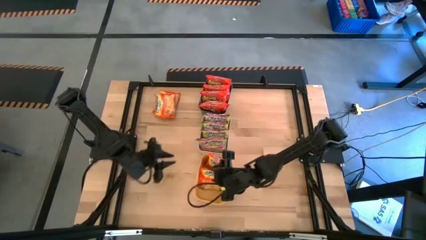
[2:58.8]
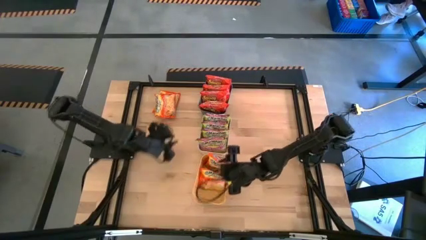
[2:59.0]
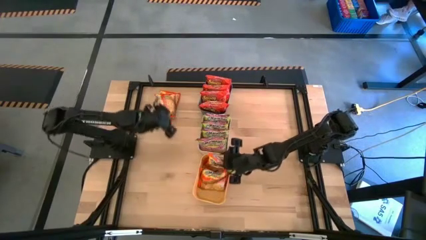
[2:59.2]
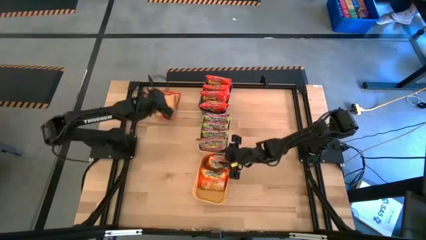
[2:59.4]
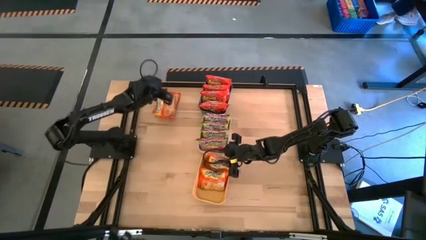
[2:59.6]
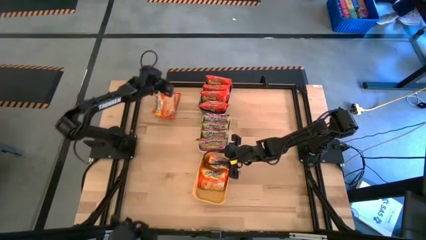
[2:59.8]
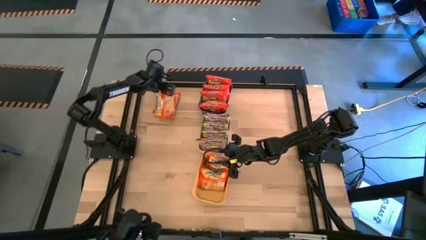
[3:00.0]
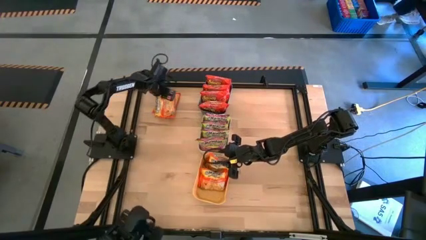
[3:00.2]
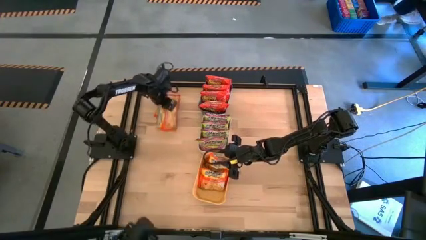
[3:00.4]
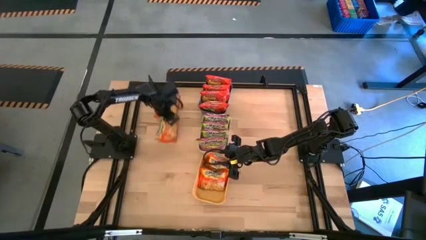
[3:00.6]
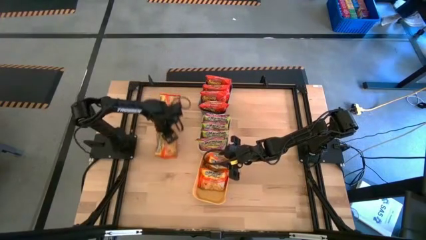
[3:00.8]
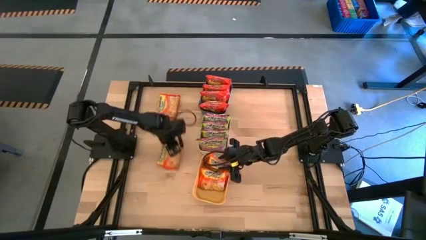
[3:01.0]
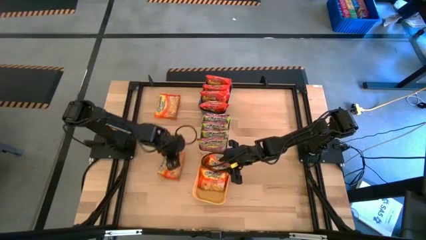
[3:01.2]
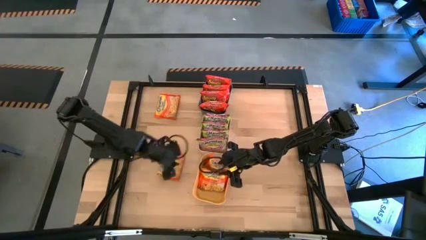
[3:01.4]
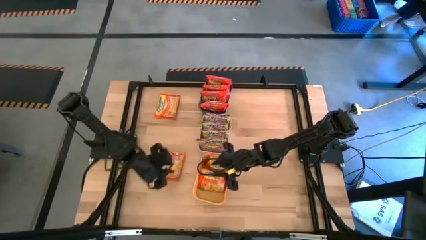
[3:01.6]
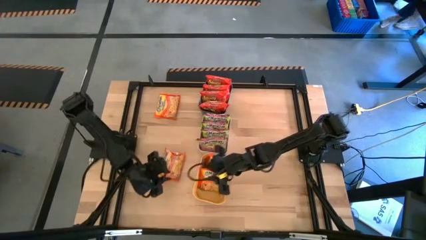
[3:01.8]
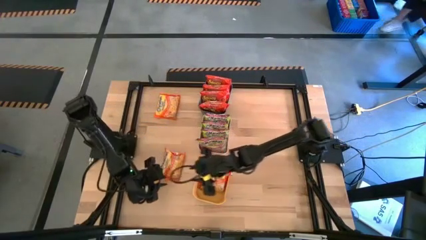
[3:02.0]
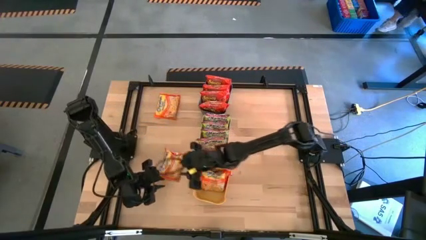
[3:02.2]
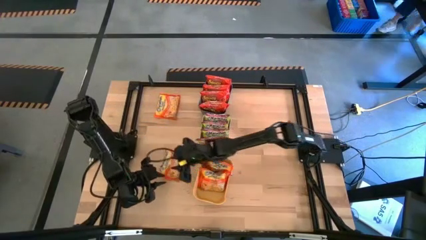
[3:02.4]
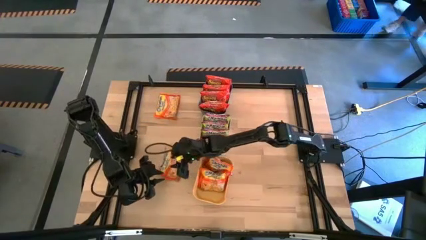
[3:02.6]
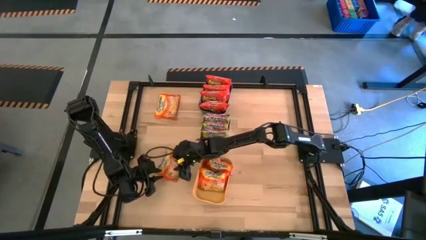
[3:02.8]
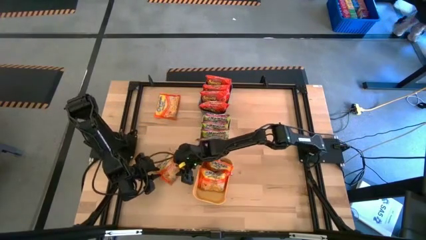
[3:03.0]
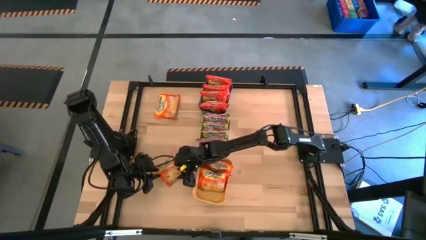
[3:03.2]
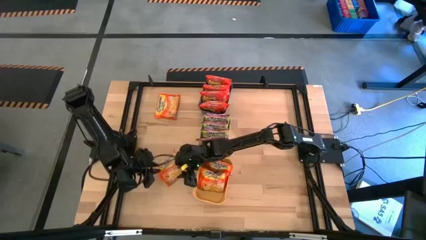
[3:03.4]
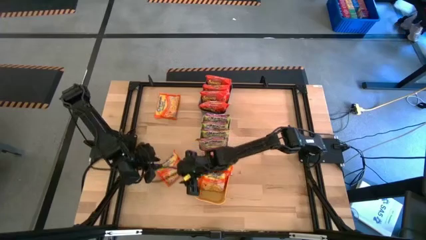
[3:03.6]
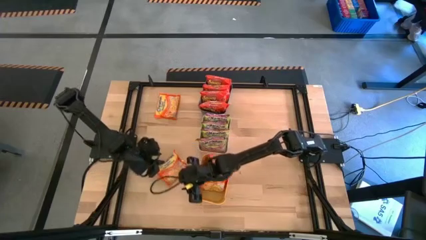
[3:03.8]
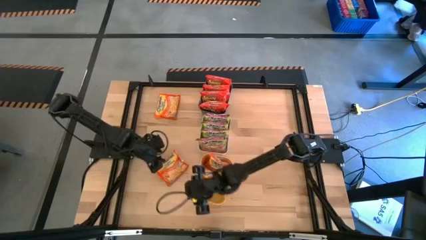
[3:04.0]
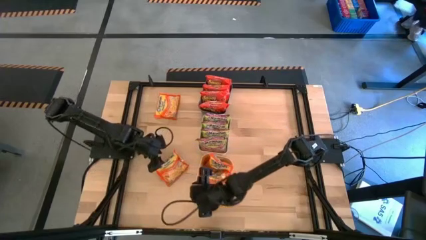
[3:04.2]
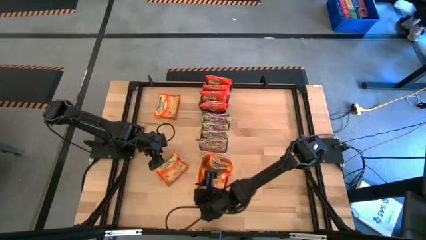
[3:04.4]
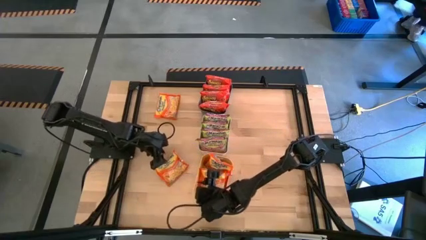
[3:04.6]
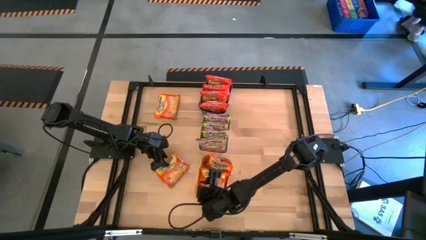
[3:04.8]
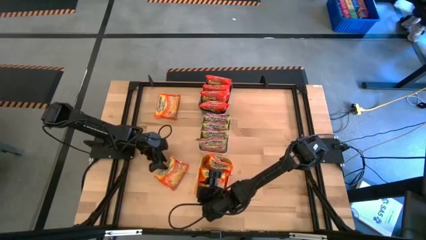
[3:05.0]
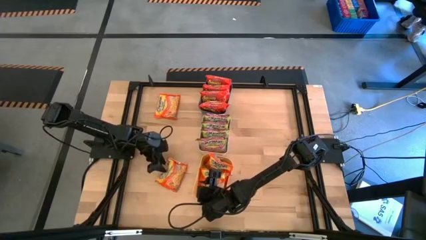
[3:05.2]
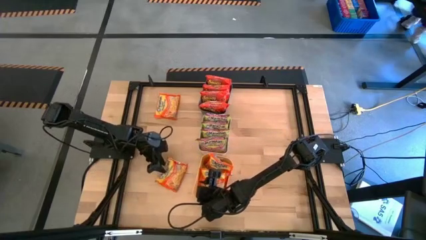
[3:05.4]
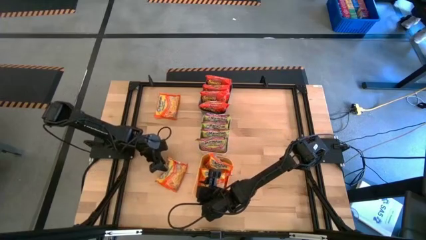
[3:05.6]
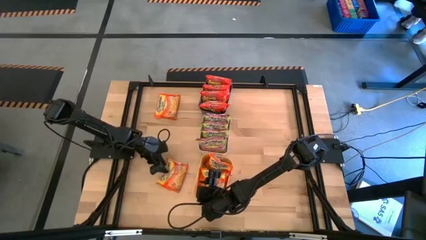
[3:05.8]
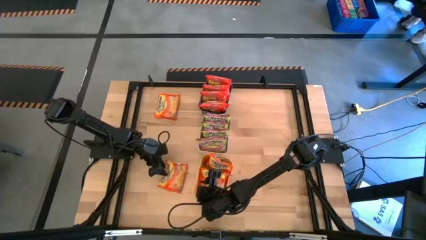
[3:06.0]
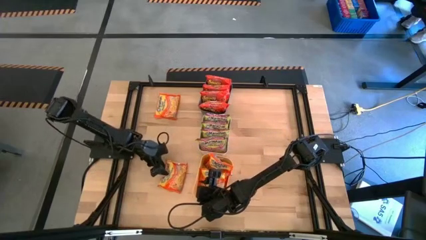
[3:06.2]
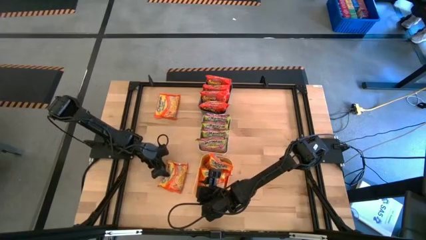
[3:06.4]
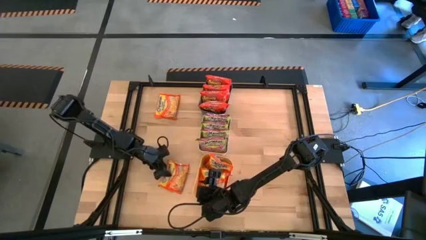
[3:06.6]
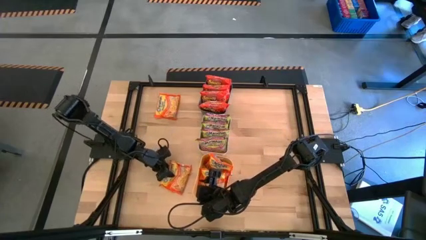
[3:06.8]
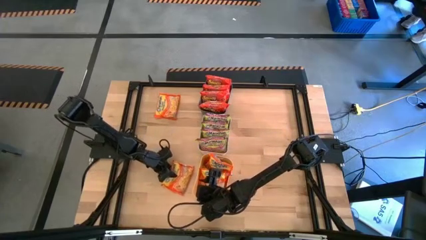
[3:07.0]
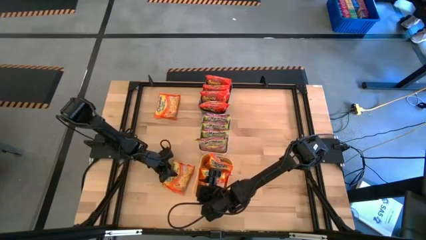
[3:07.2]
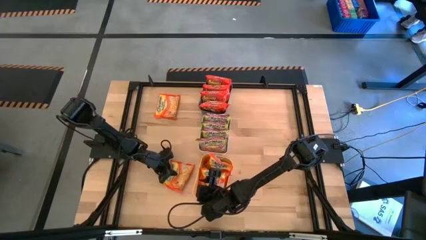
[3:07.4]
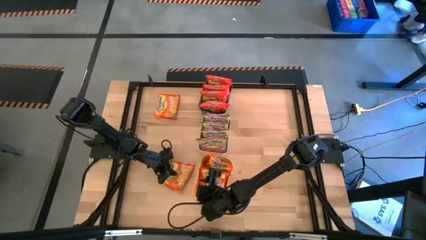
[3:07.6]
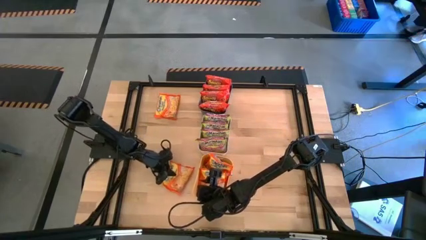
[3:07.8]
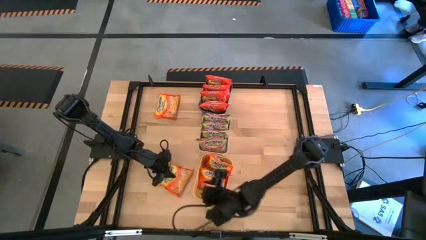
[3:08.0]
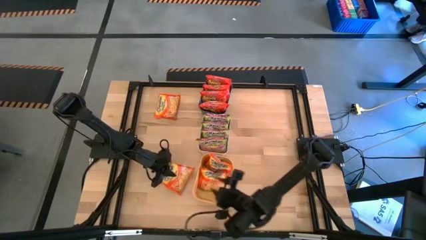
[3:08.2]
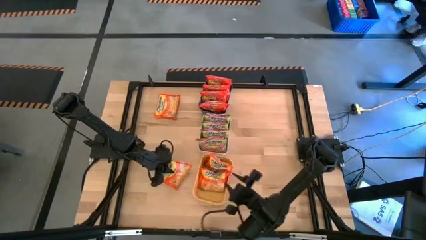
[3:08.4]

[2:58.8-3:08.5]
Task: Sort Maruchan noodles
Put the orange noodle pack into the yellow bin

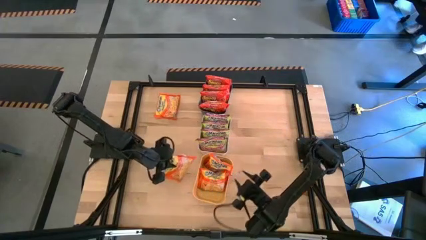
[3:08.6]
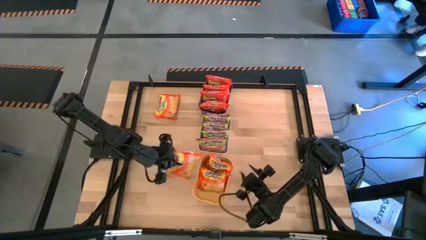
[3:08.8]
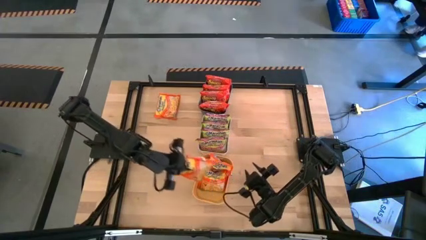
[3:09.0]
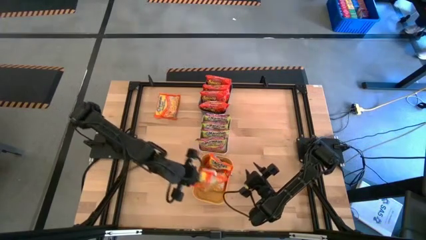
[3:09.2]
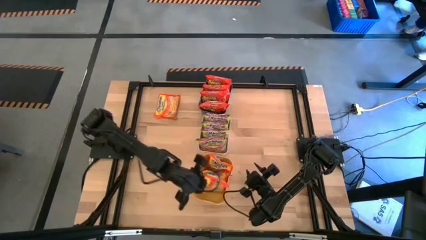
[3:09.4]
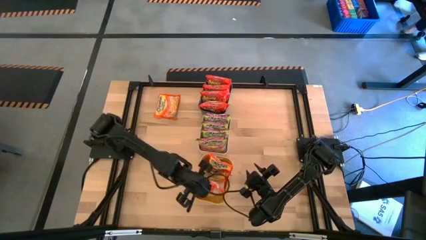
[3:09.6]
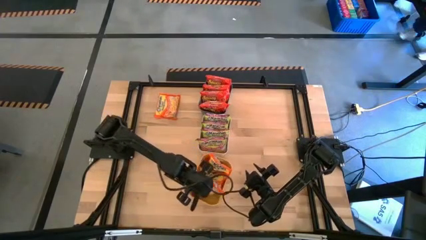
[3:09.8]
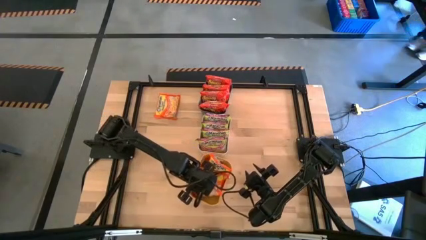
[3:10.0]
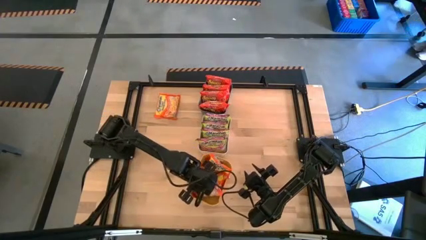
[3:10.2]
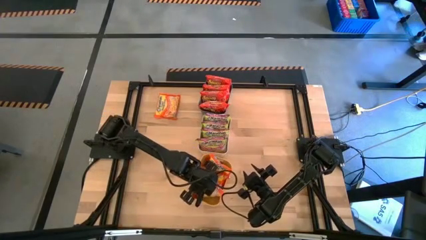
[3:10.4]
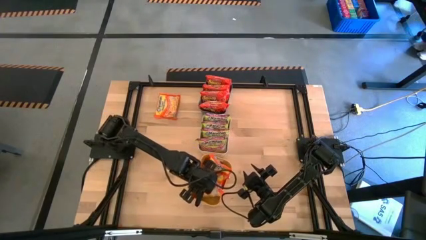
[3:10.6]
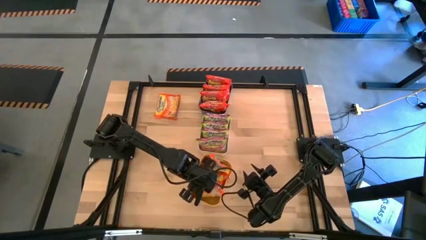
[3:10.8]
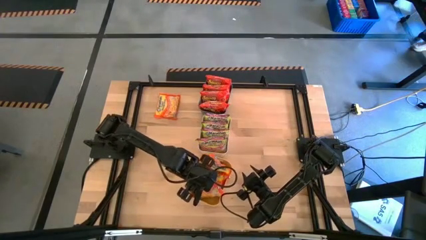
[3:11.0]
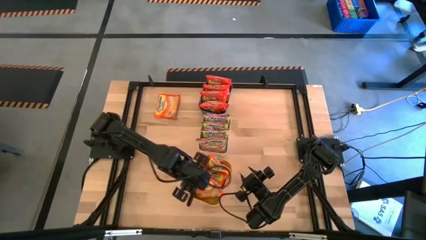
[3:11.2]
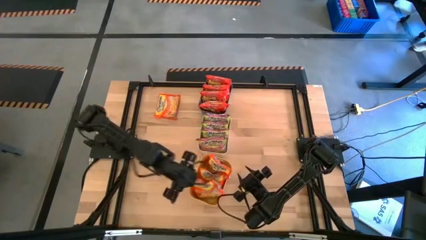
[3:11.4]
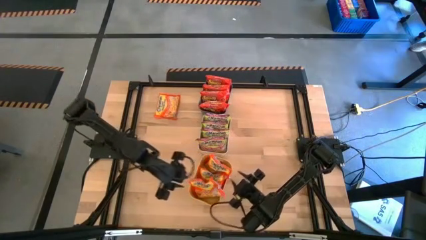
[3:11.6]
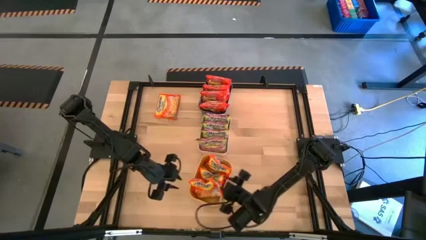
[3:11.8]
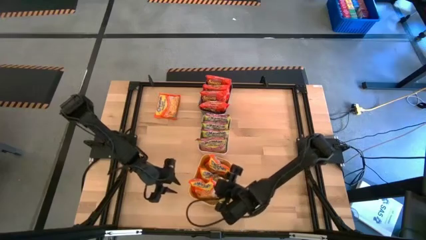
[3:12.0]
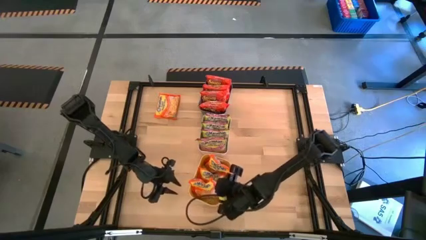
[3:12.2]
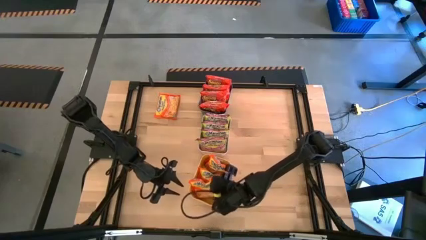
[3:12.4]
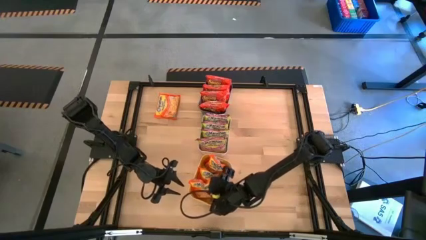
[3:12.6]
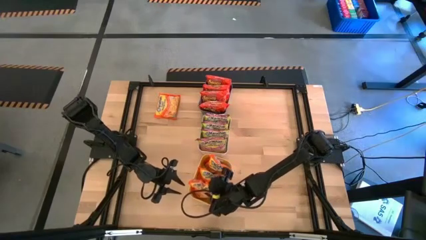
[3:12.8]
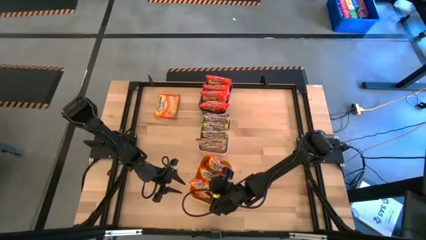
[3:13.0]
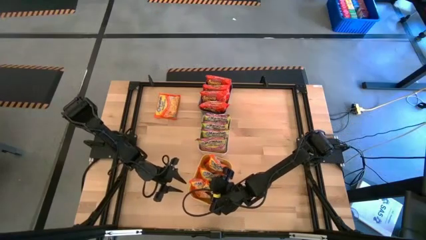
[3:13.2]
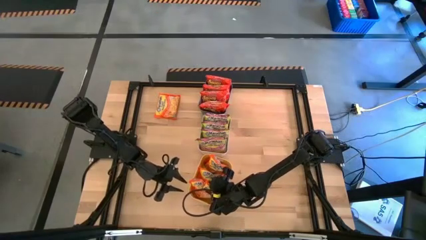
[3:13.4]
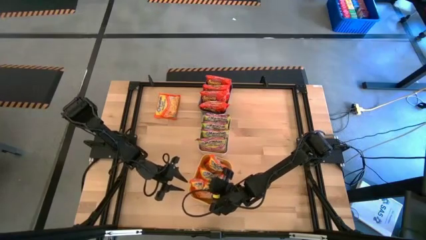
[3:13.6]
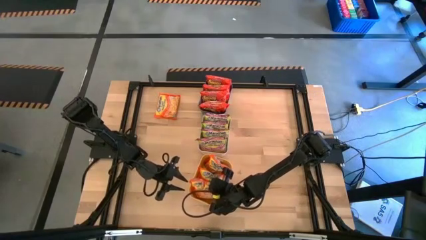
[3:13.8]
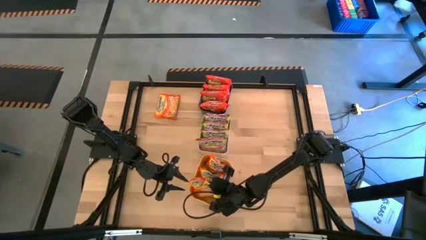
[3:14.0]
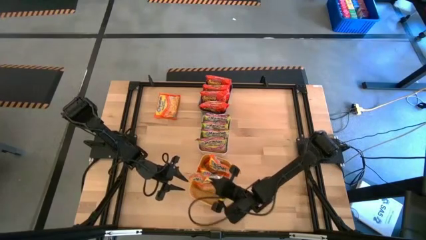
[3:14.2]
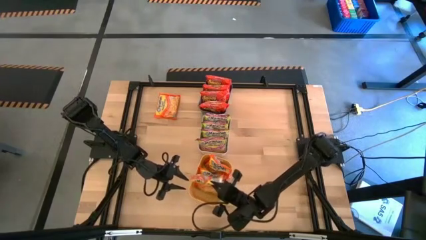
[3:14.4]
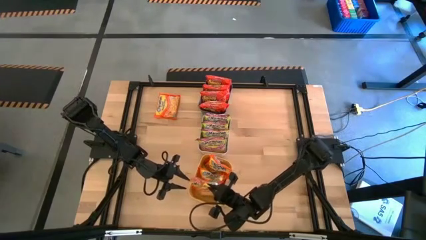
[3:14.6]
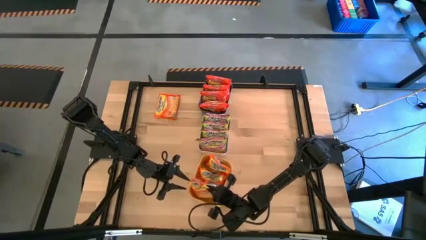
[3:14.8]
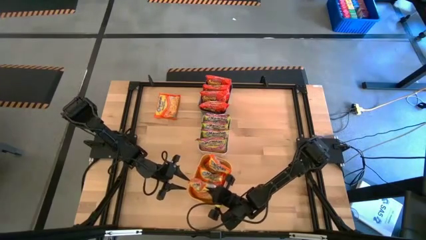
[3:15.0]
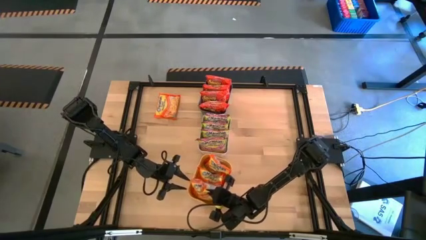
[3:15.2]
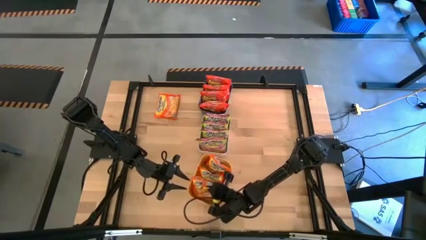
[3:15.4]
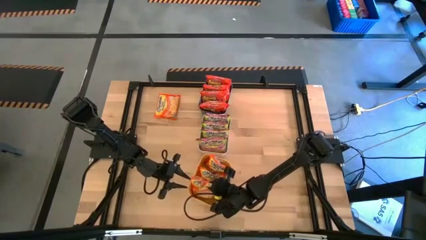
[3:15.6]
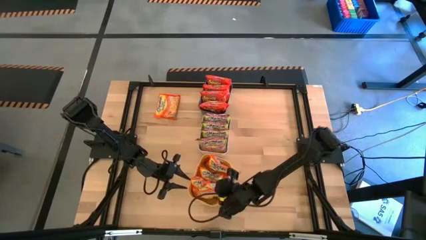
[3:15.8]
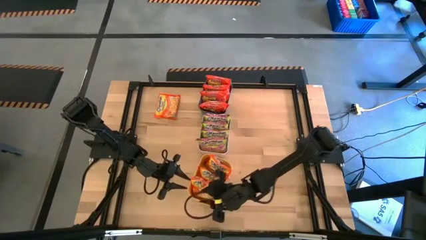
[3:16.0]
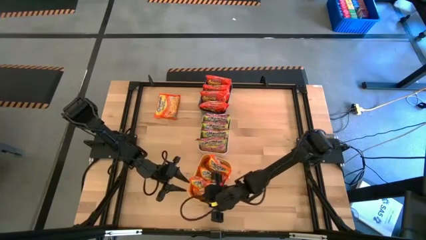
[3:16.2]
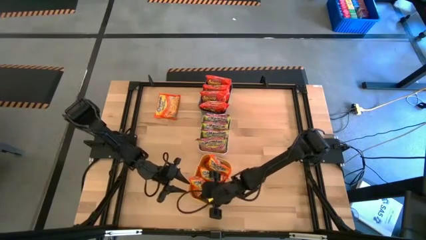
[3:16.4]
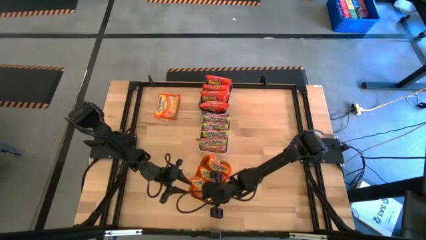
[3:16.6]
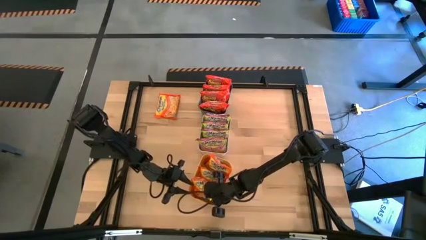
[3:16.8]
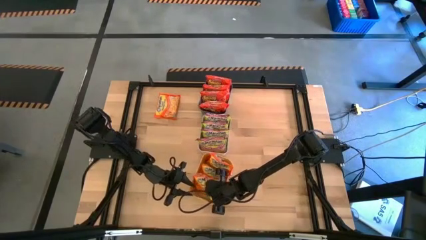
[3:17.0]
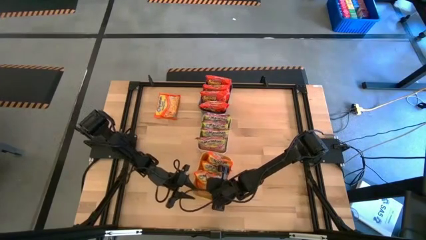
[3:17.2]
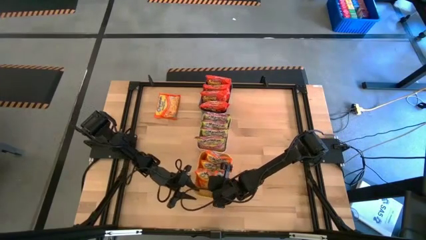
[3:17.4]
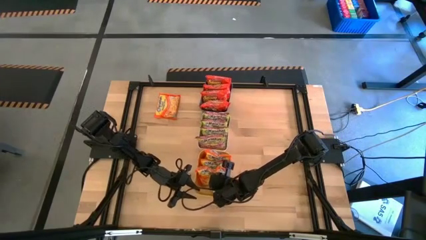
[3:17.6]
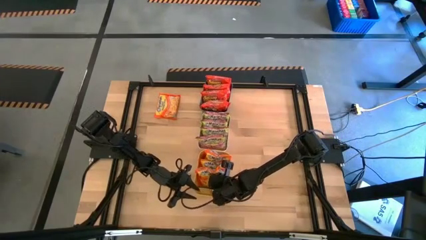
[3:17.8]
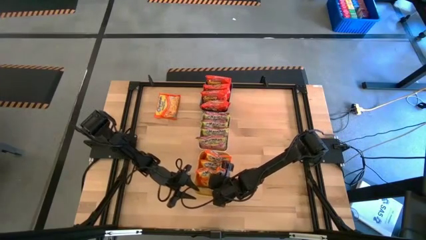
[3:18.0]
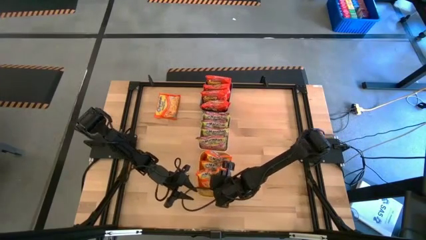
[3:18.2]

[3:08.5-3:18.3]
Put the orange noodle pack into the yellow bin
